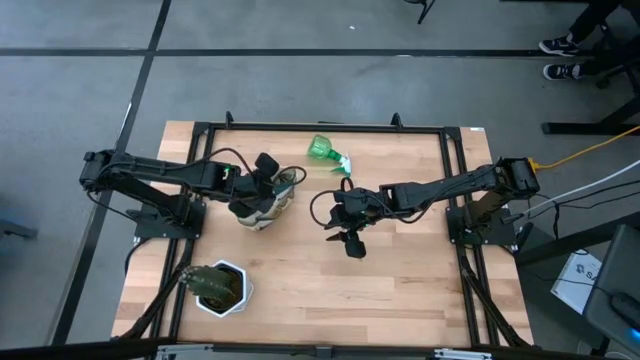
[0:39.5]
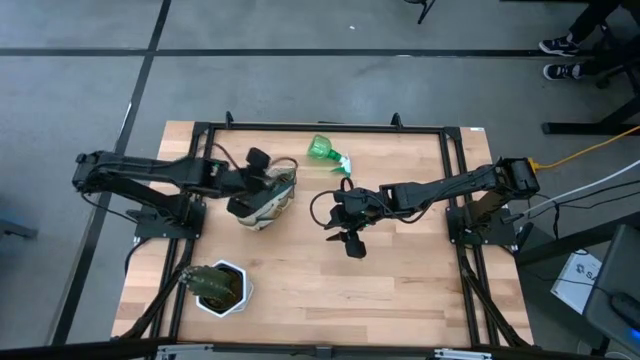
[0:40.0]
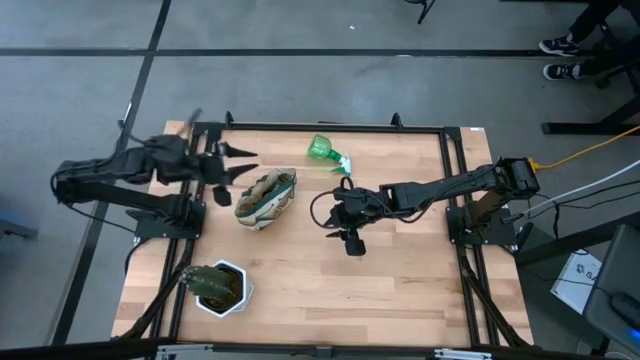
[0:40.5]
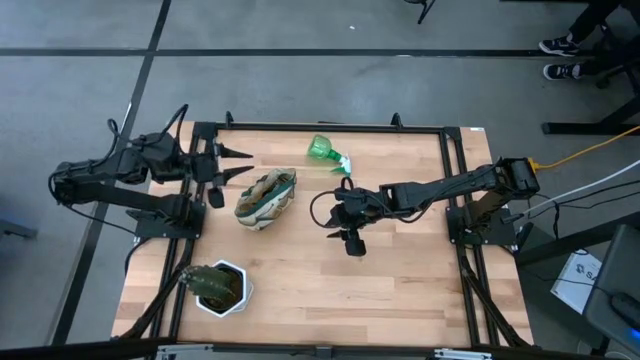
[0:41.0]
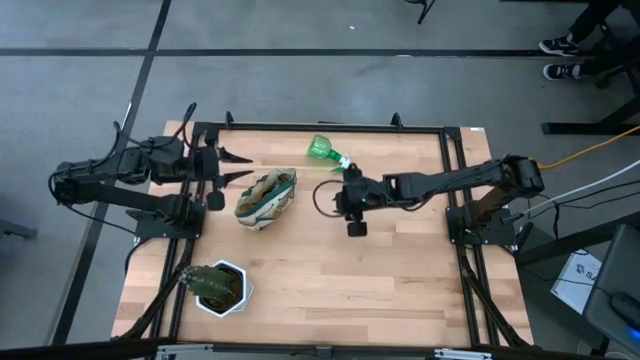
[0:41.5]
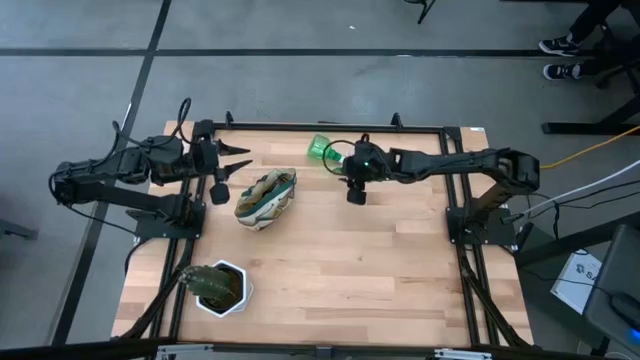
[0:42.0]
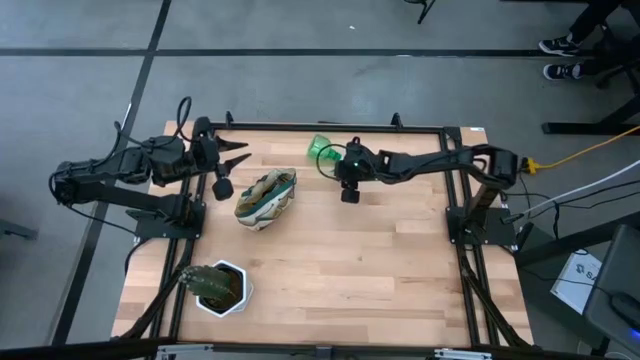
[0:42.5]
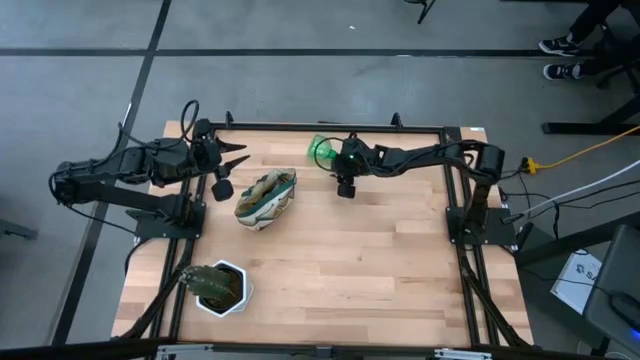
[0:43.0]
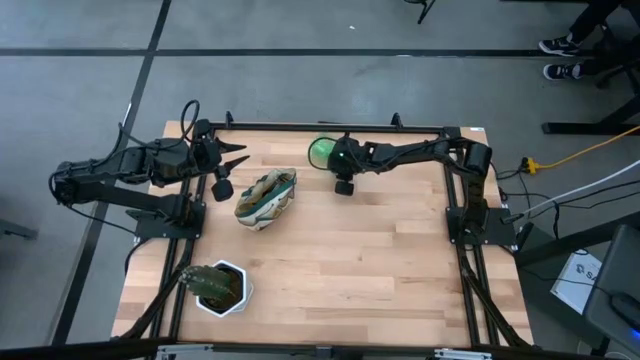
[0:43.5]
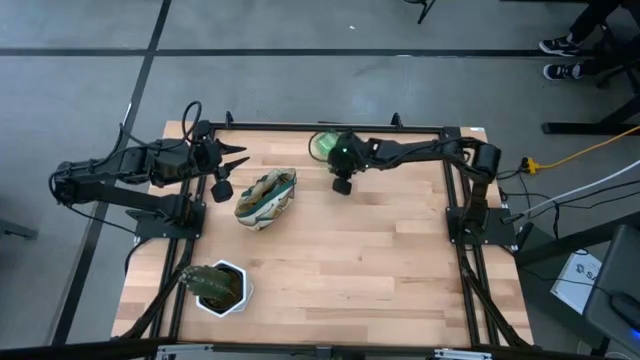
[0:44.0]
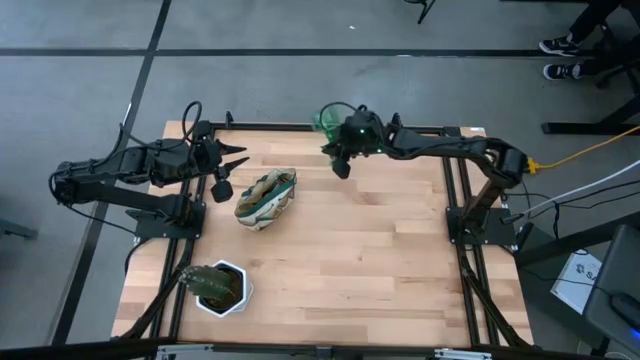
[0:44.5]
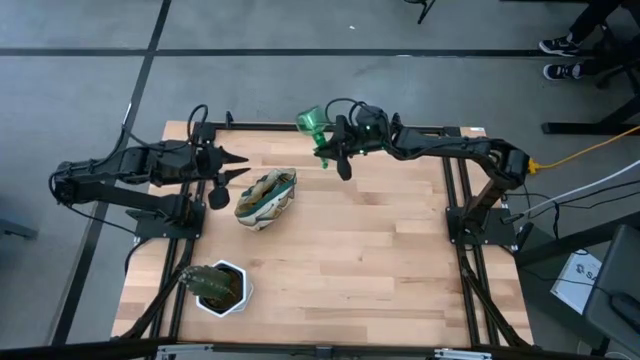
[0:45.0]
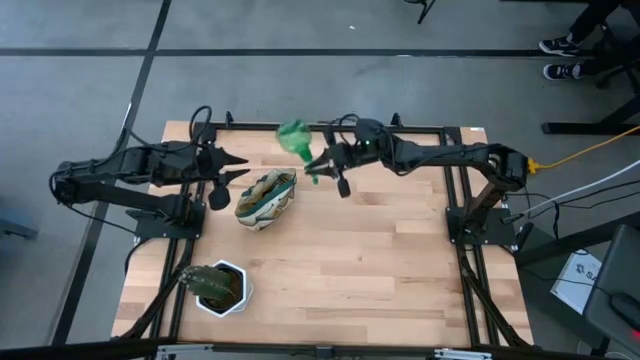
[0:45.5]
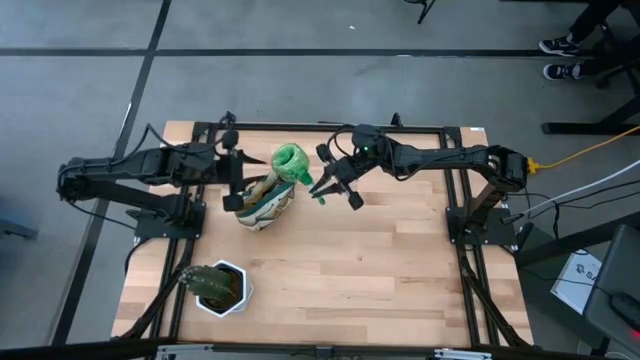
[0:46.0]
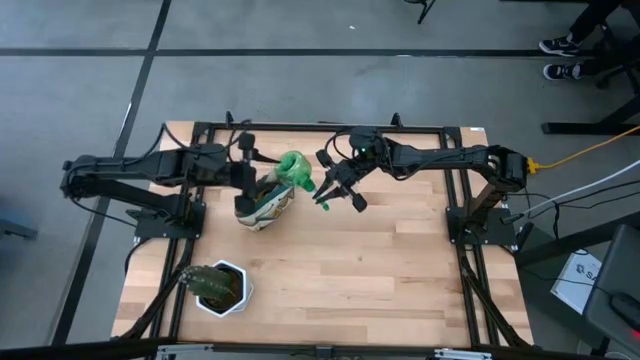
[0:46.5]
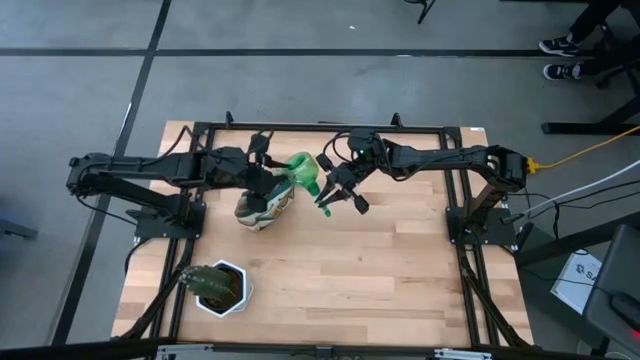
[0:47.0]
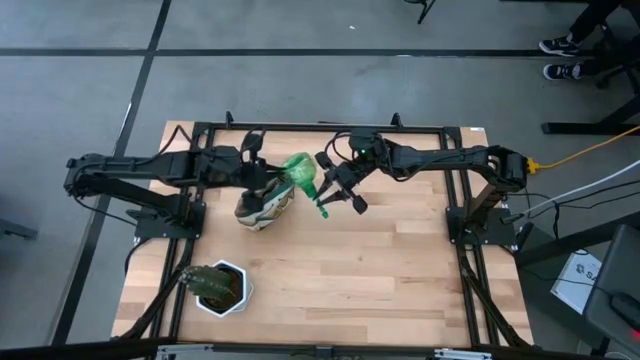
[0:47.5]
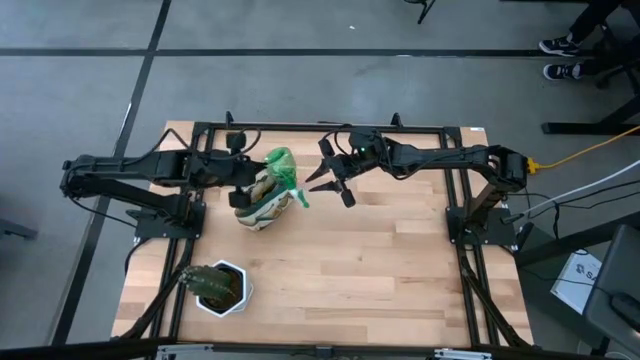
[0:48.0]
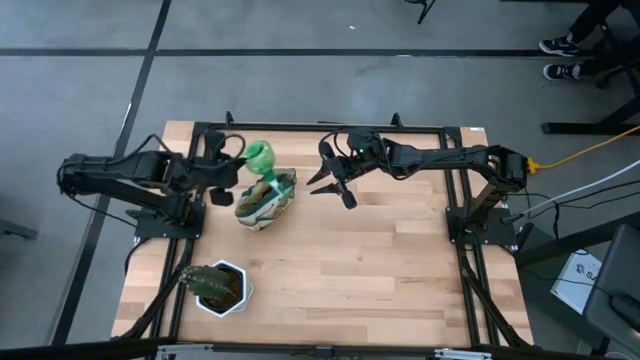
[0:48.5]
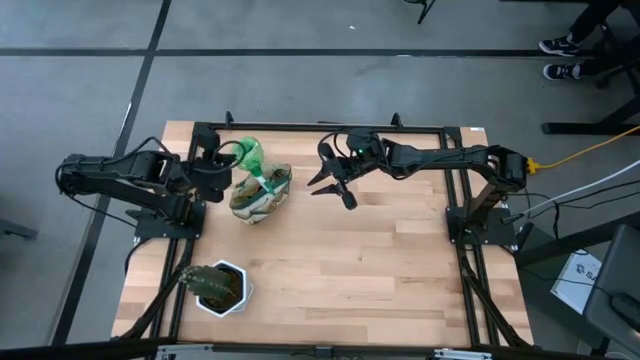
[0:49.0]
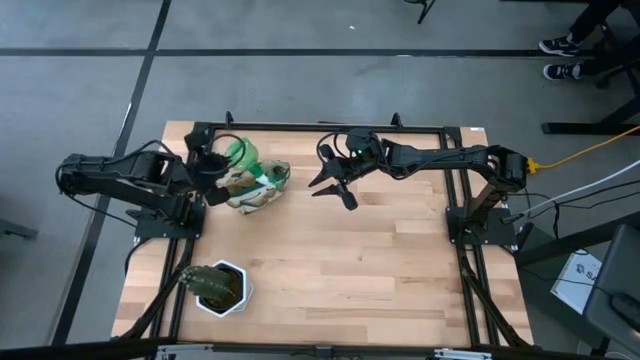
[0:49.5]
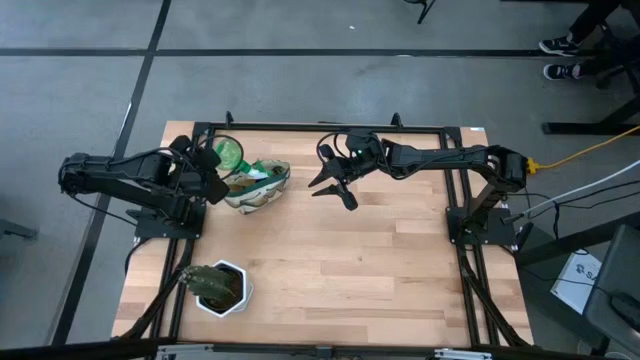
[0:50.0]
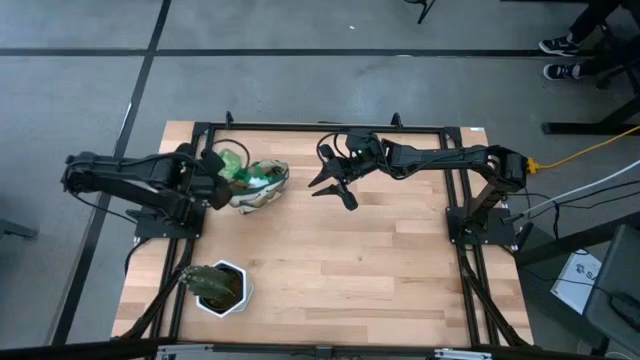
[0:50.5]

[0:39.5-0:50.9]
Task: Pick & Place Garden tools in Gardening bag
Put the green spray bottle into the white gardening bag

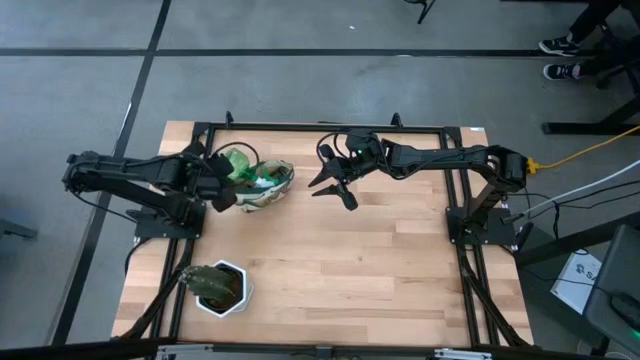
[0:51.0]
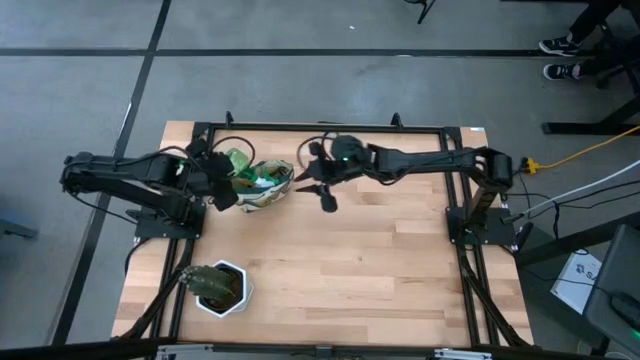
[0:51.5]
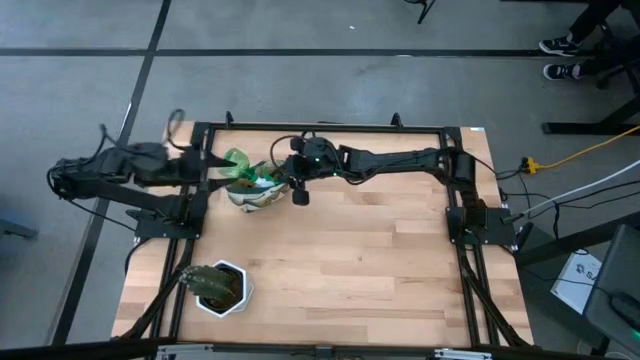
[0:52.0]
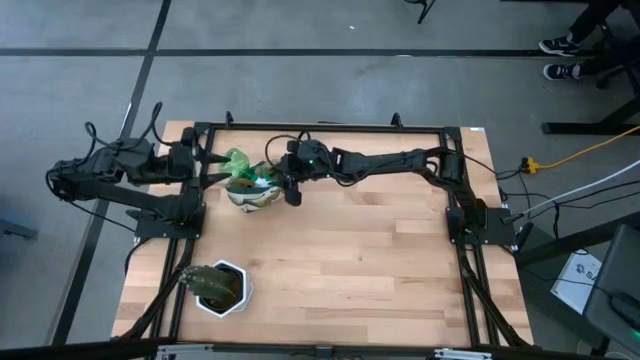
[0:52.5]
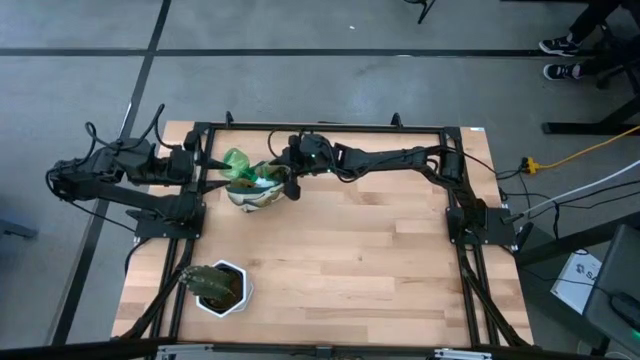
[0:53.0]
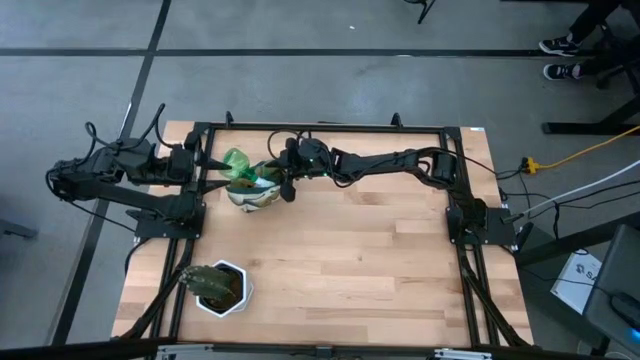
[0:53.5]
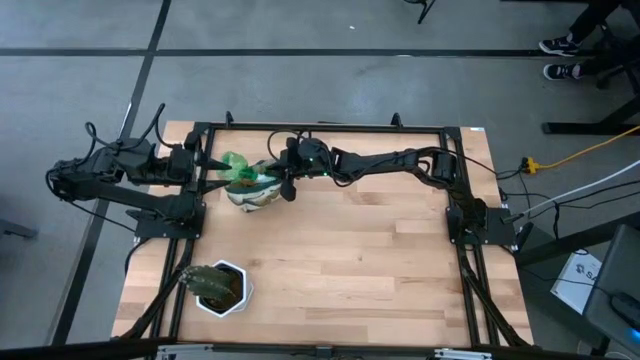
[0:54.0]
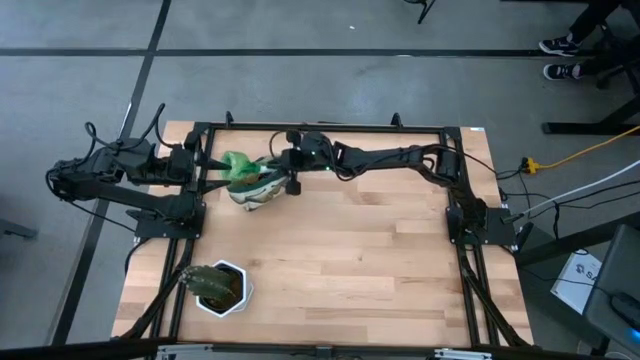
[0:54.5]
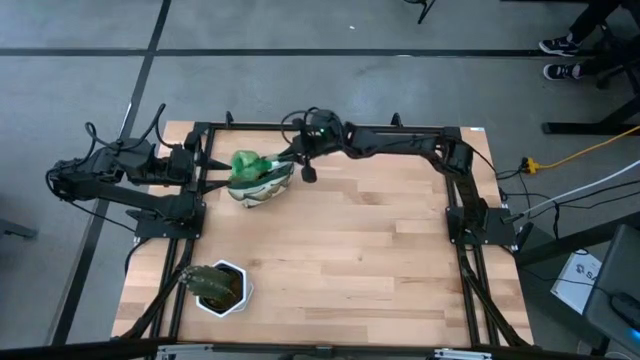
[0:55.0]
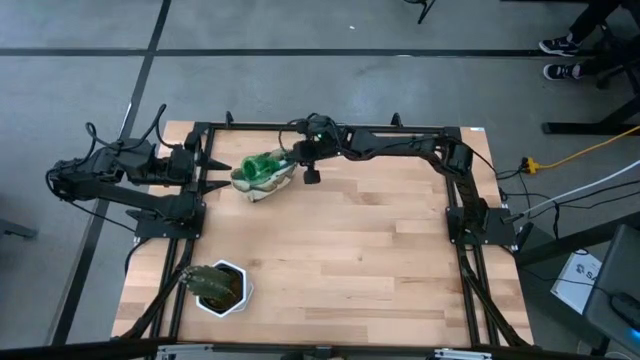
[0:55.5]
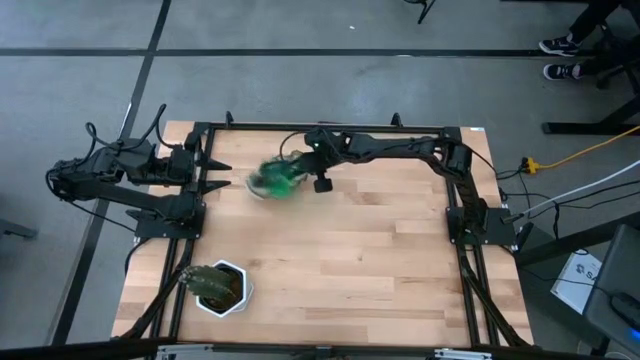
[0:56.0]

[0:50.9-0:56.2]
Put the green spray bottle into the white gardening bag

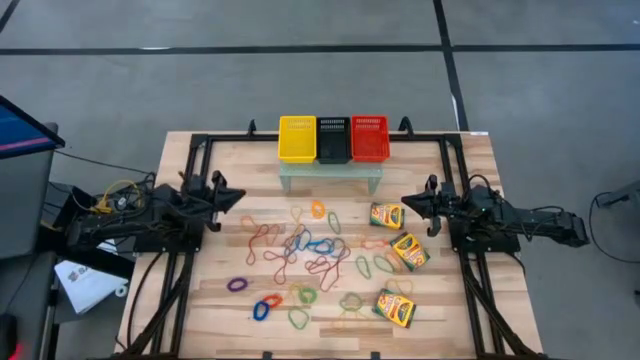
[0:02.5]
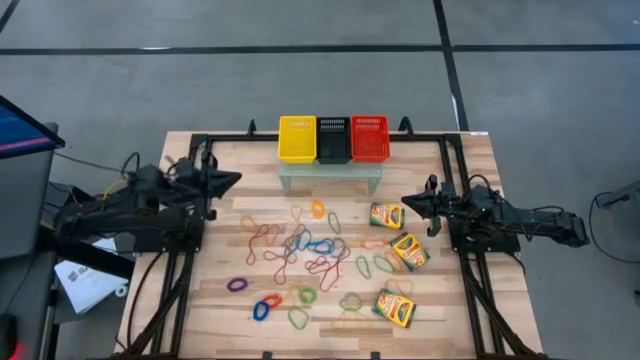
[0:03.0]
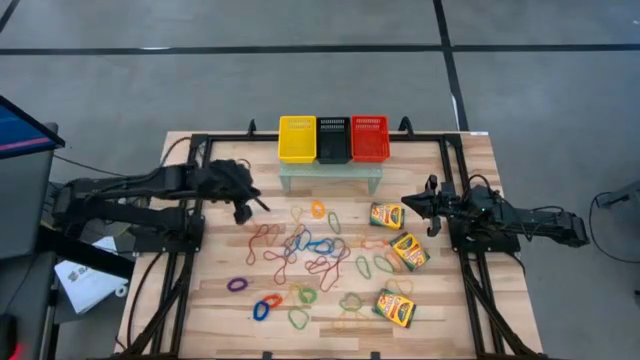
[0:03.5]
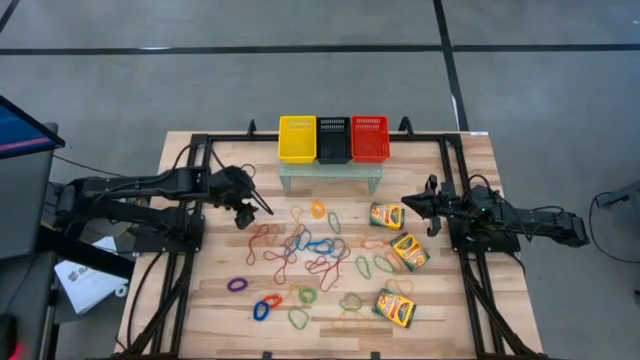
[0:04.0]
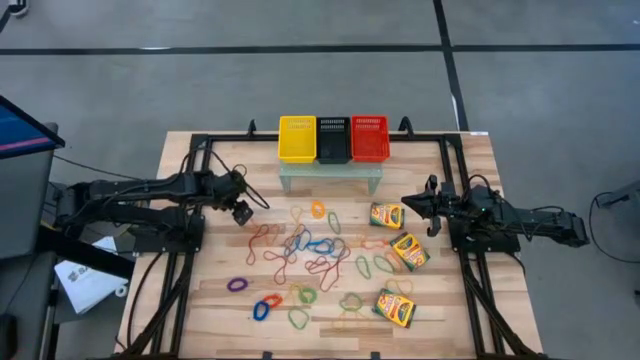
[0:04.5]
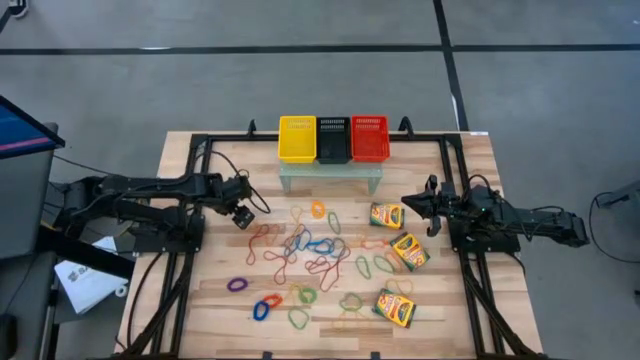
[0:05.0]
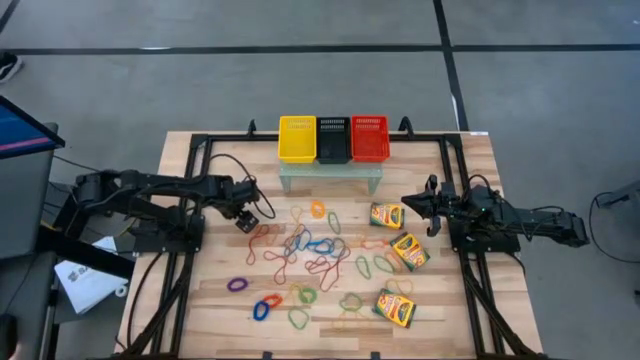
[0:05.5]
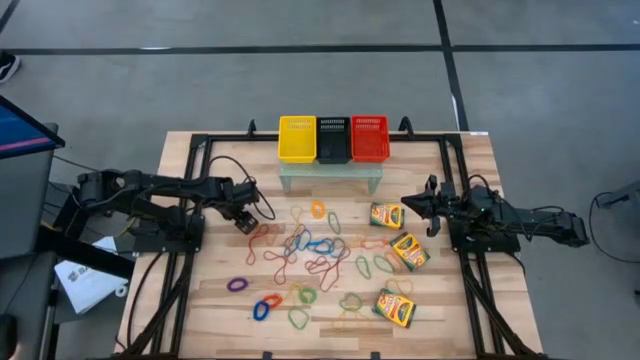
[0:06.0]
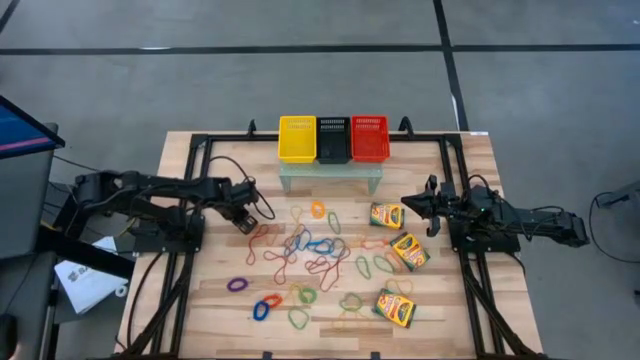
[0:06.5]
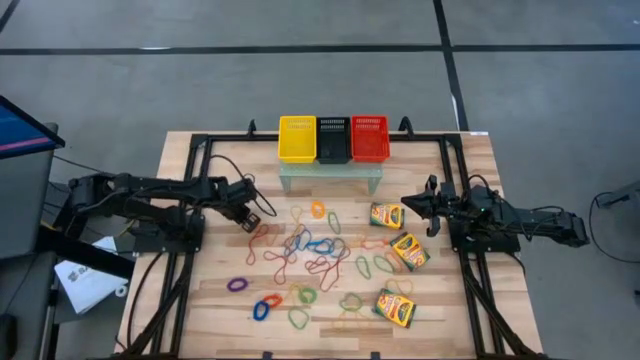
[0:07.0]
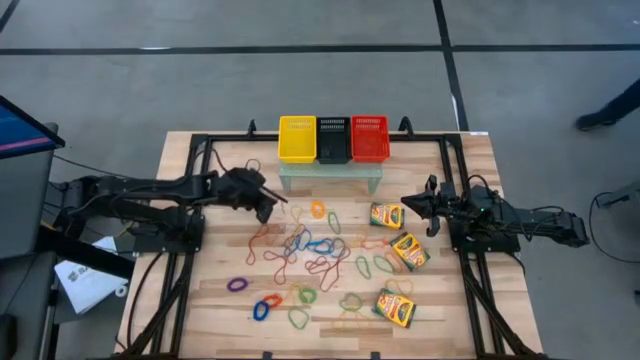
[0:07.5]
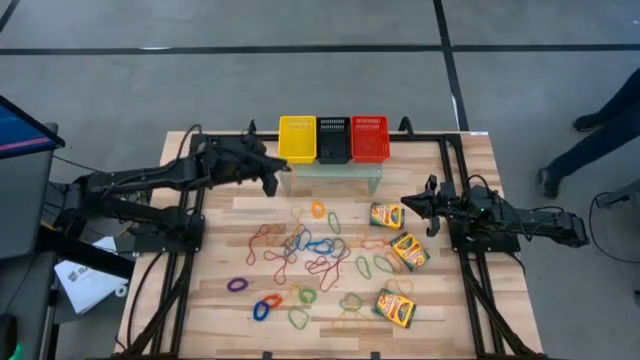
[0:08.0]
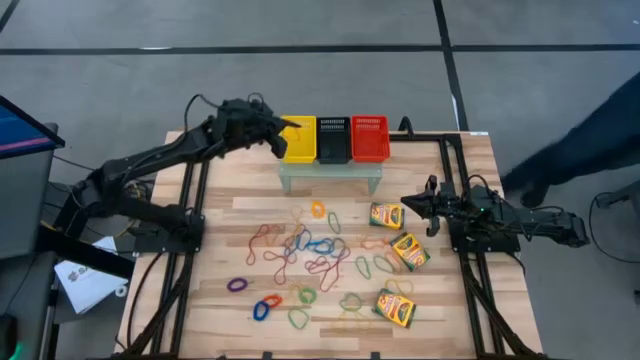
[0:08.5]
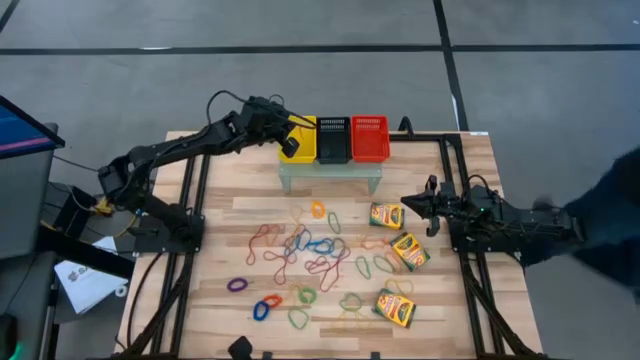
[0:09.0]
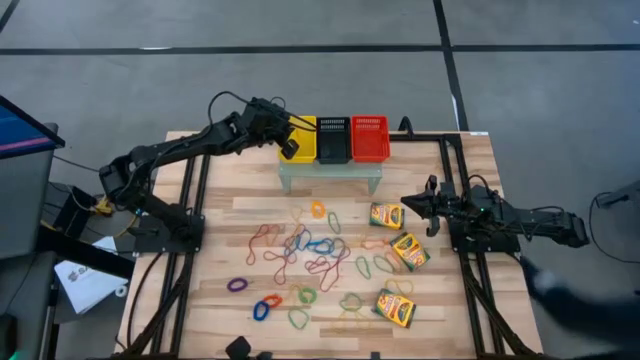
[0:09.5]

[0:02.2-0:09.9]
Task: Pick & Place Office Desk Supplies
Put the small orange rubber band into the yellow bin on the shelf
